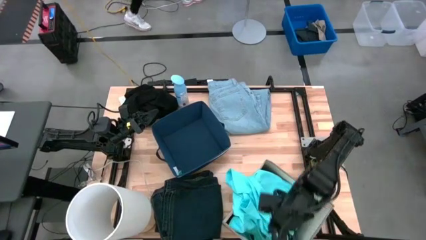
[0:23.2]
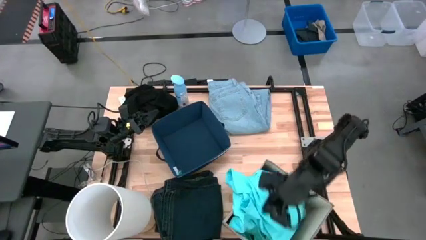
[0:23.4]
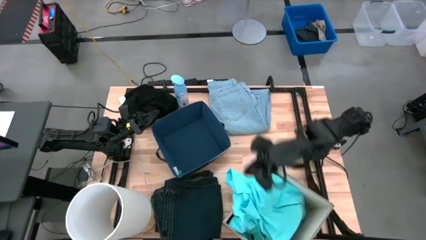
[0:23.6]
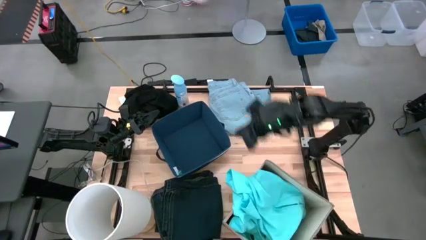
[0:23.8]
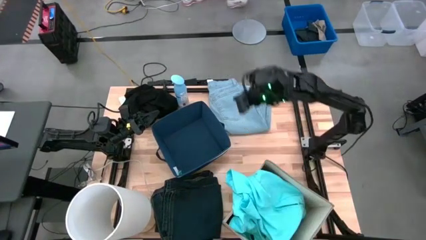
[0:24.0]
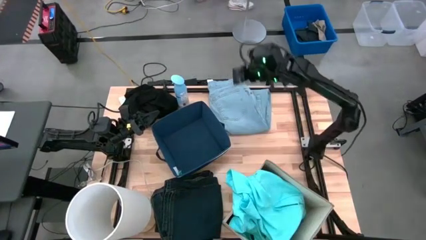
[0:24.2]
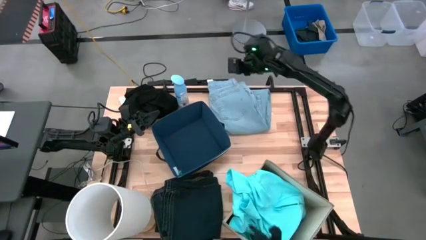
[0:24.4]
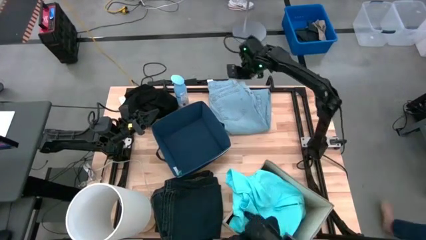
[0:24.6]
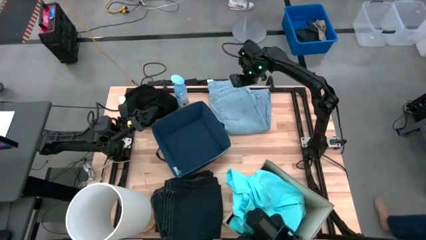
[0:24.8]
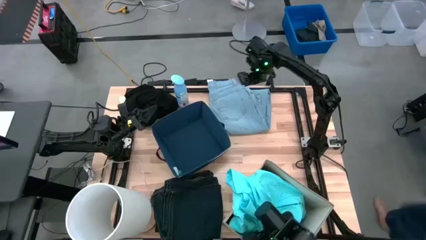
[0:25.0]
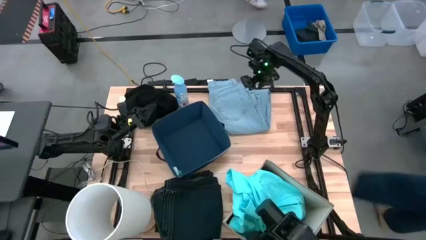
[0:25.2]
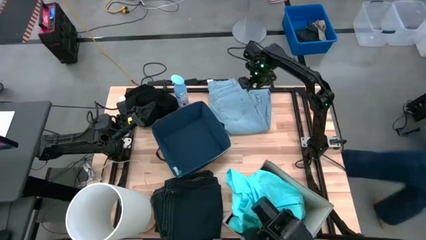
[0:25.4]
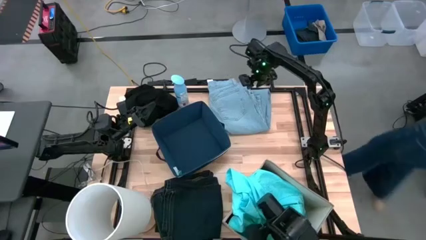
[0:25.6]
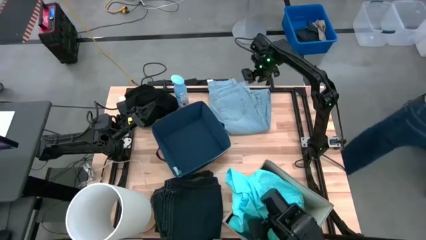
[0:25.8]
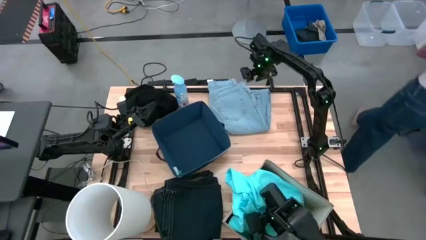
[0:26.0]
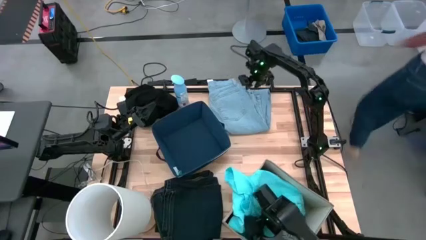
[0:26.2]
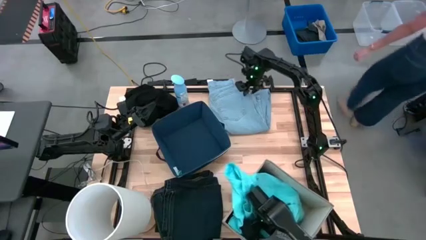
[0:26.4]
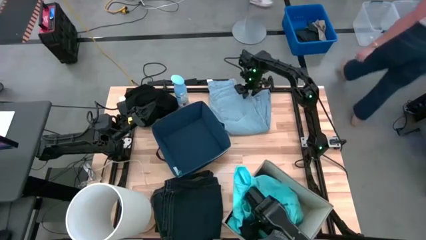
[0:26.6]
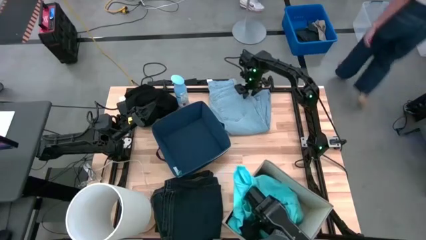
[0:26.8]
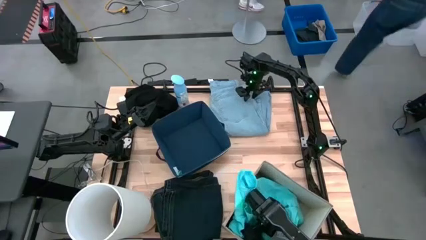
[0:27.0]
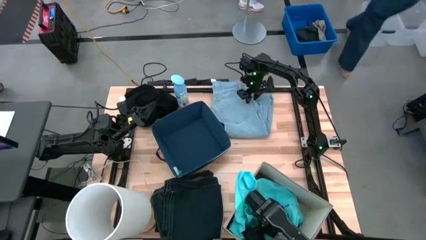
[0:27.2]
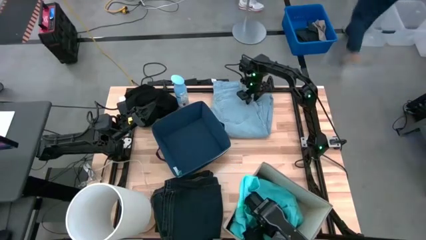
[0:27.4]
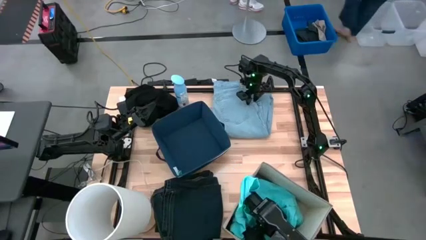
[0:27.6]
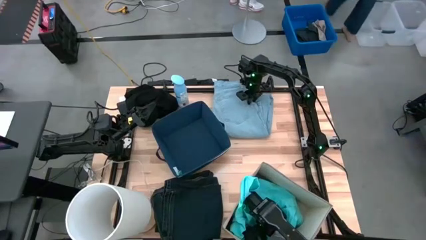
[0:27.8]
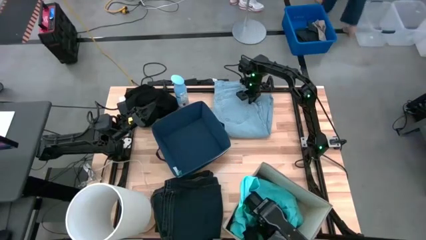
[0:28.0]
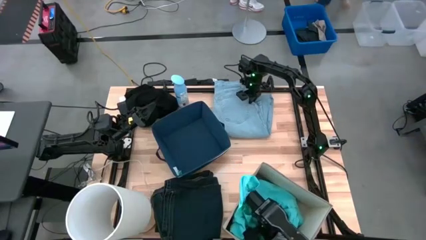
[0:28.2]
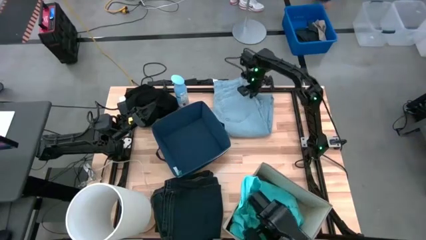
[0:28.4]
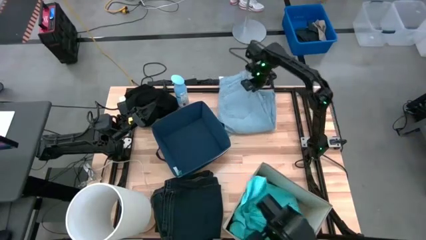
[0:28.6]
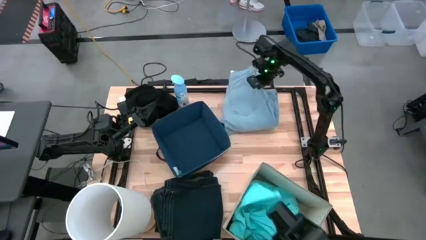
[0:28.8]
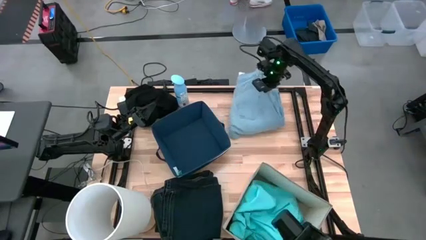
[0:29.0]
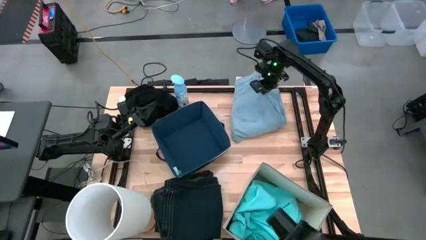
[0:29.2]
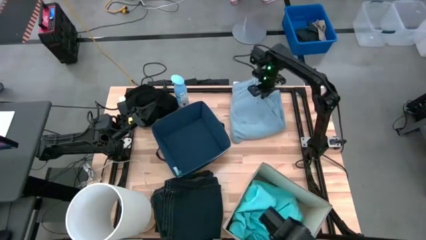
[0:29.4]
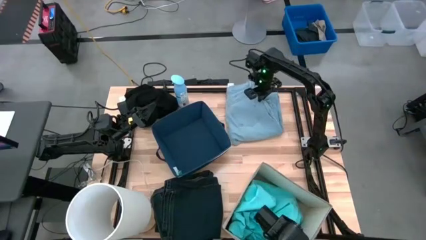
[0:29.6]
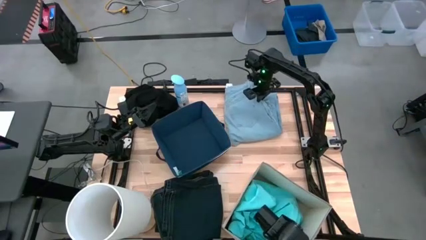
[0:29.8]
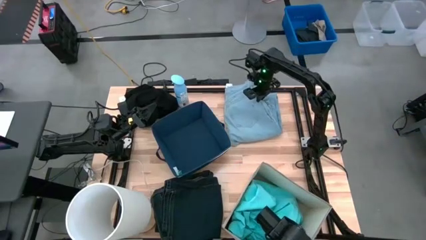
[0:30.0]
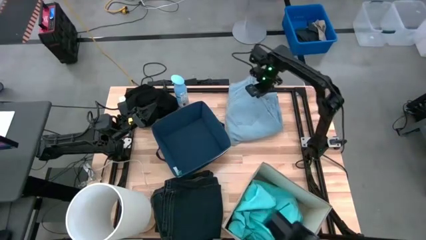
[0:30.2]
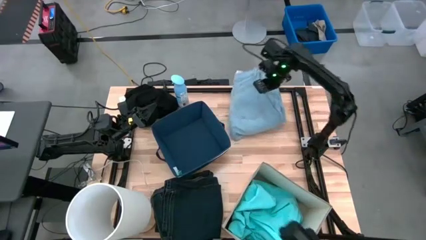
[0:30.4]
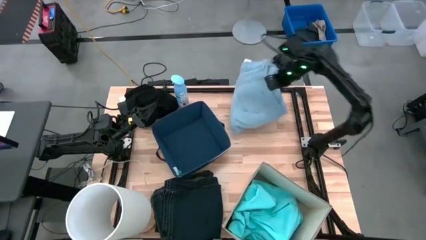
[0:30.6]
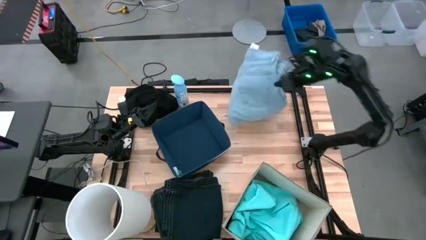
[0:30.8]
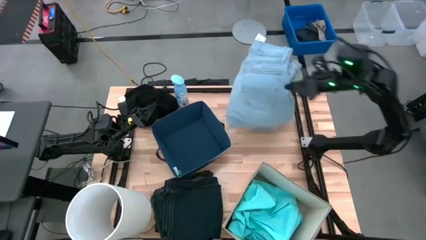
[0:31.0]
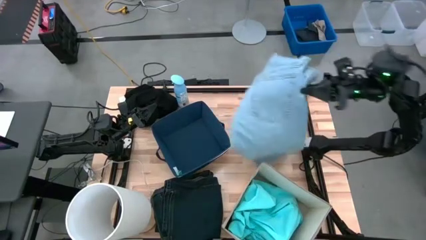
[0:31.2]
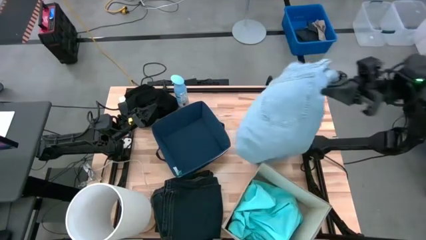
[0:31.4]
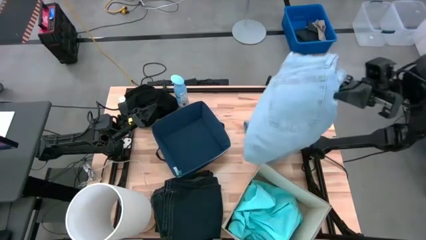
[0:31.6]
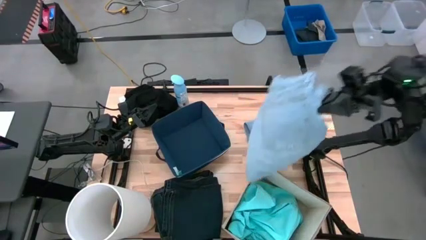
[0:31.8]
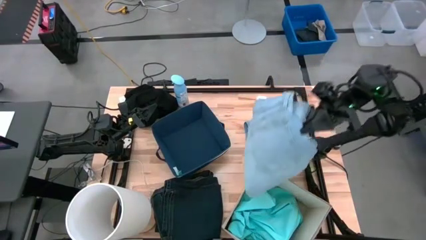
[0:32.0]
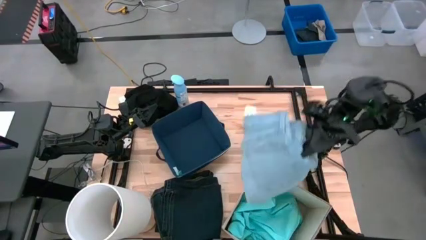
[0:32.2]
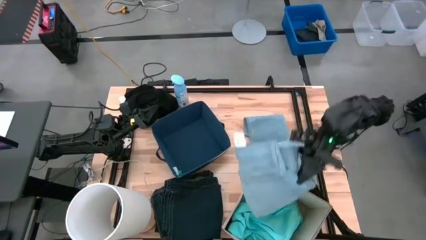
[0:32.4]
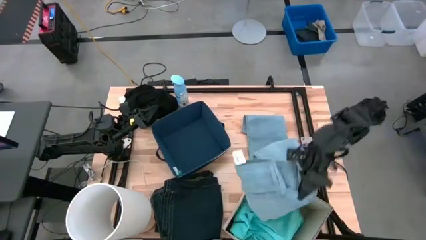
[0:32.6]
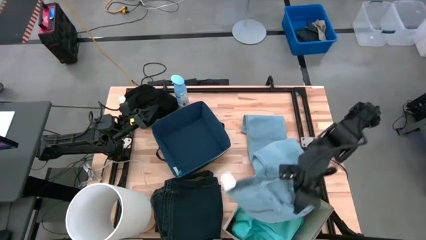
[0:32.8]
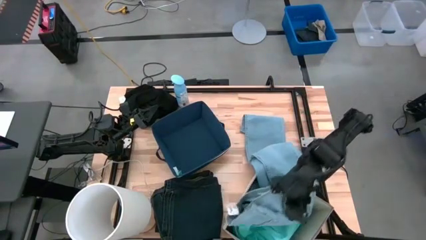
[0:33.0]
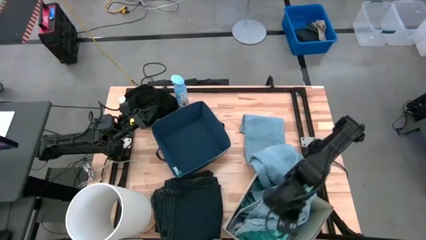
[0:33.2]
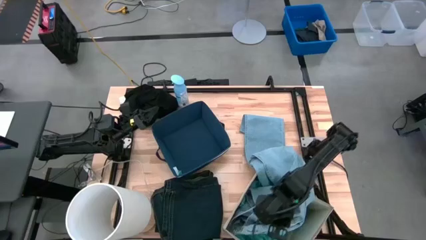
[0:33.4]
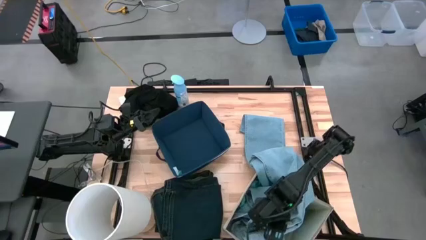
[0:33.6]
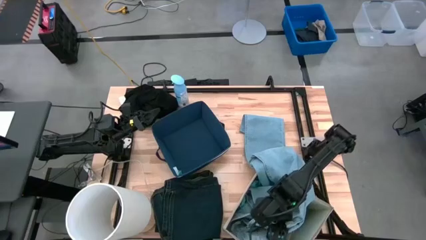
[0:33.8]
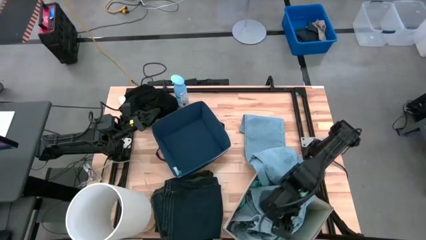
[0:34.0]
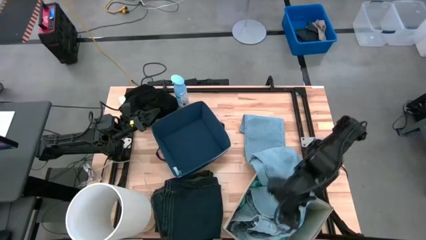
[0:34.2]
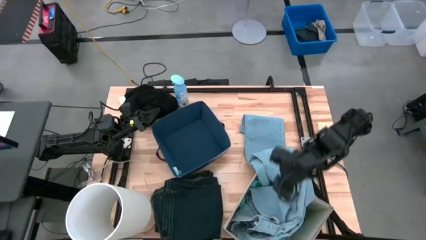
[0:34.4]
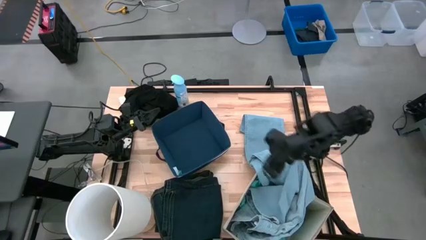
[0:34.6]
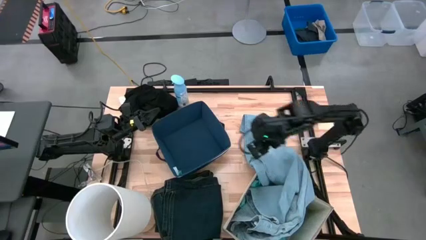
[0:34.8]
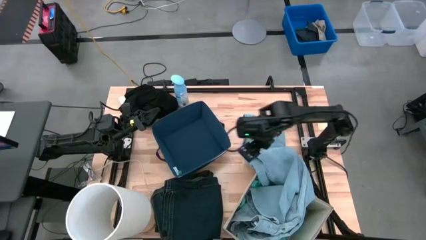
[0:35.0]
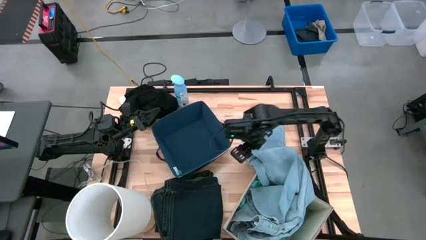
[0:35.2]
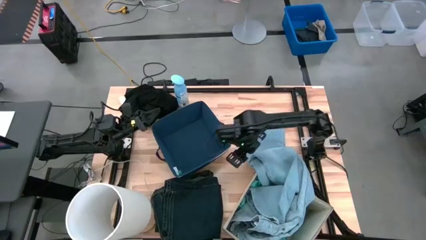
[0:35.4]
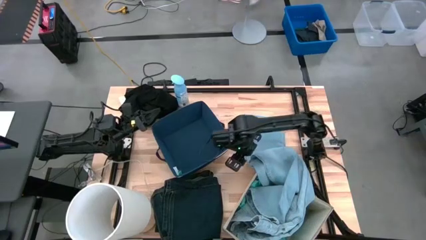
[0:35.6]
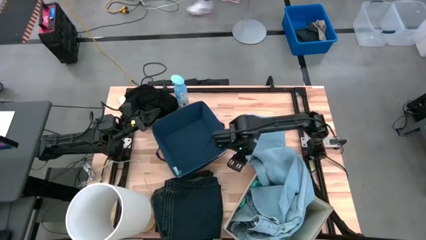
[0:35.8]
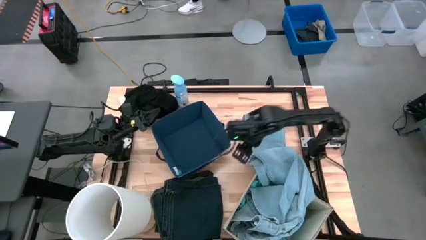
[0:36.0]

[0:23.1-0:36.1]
Task: Sort clothes
Put the blue pants into the brown laundry organizer

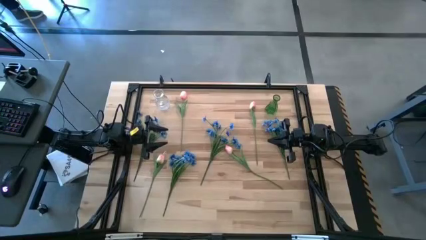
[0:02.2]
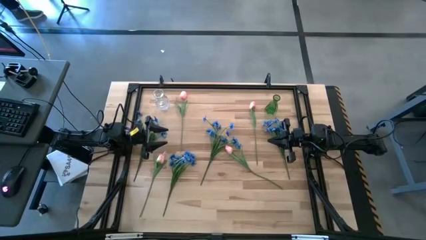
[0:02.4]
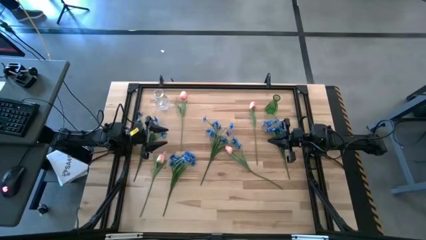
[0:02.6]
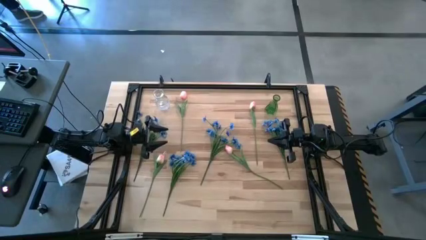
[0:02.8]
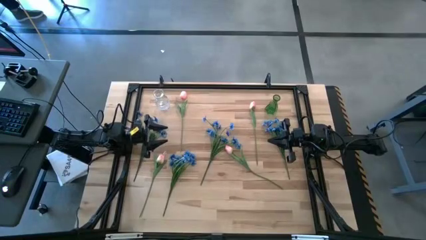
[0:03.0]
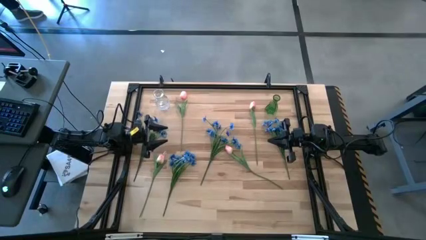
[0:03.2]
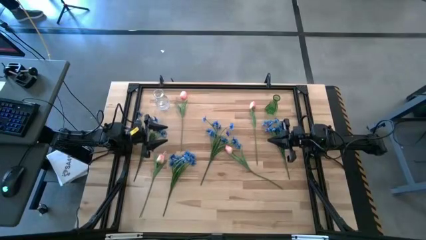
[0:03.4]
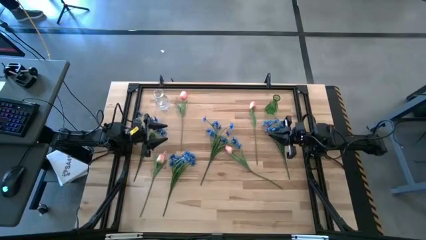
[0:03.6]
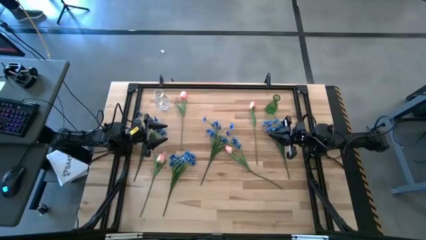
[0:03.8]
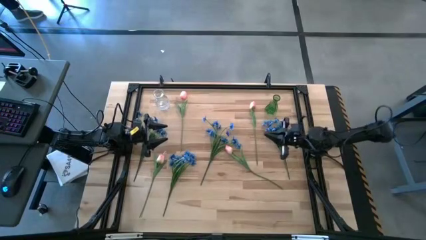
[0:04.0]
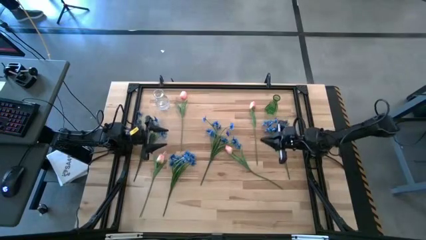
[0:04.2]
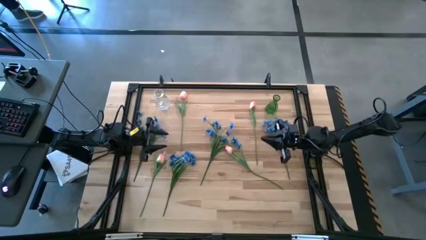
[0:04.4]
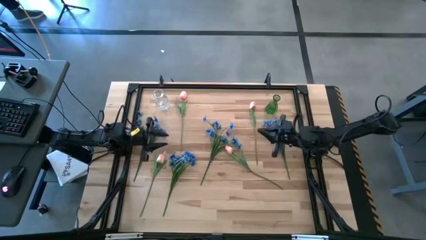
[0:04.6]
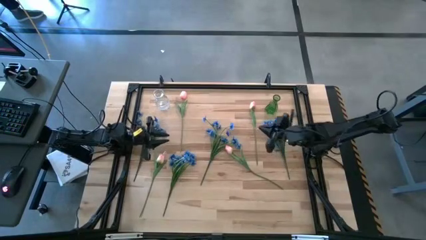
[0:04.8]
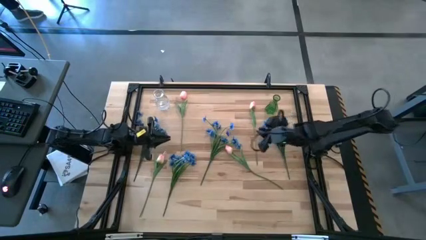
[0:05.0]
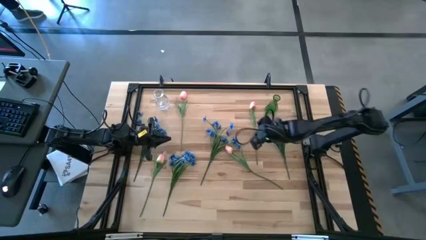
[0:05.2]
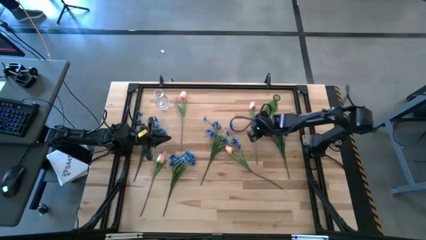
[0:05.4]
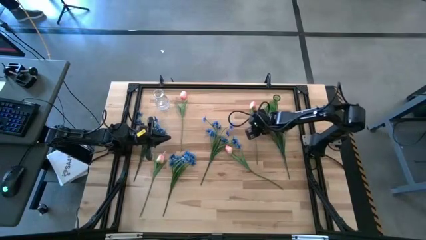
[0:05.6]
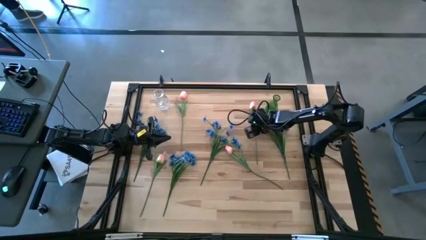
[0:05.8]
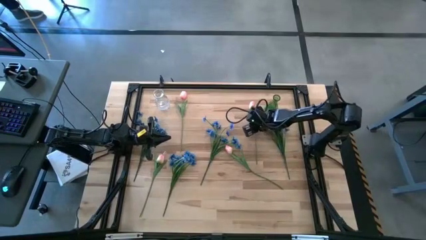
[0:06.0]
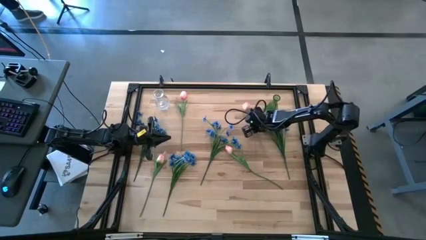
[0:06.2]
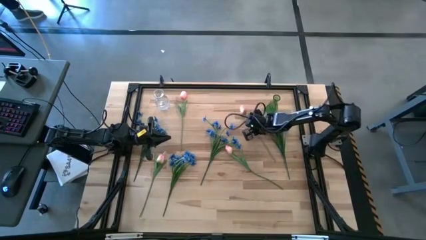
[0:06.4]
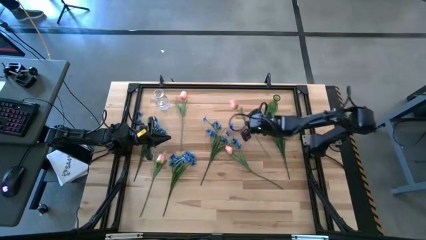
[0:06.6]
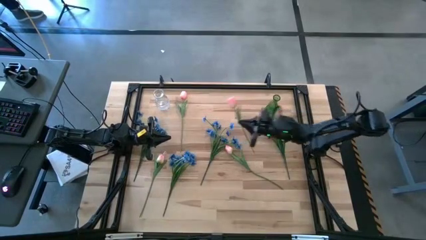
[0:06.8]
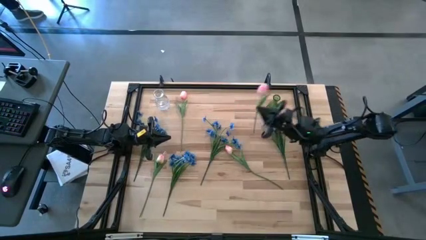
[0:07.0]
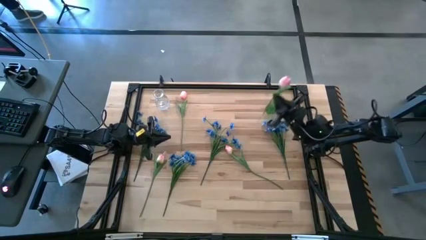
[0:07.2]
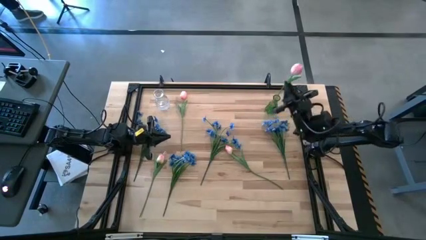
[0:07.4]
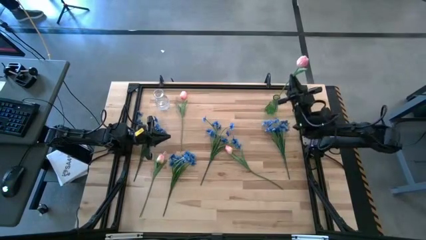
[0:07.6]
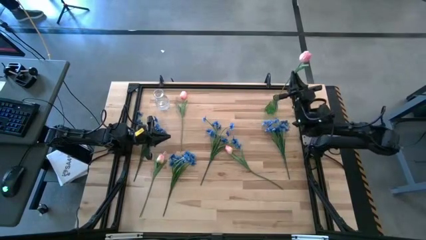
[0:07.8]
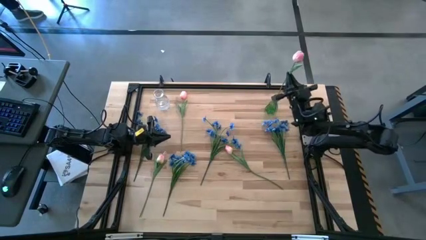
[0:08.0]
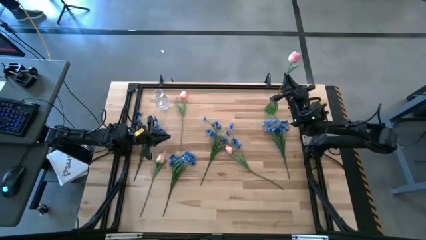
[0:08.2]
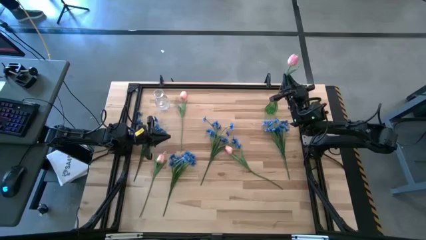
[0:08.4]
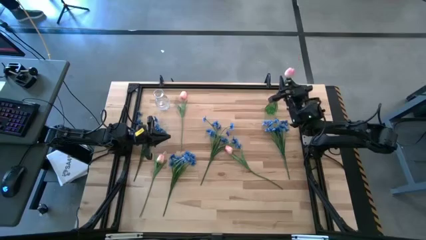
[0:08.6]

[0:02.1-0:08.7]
Task: Sort flowers into vase by color
Put the top right pink tulip into the green vase
